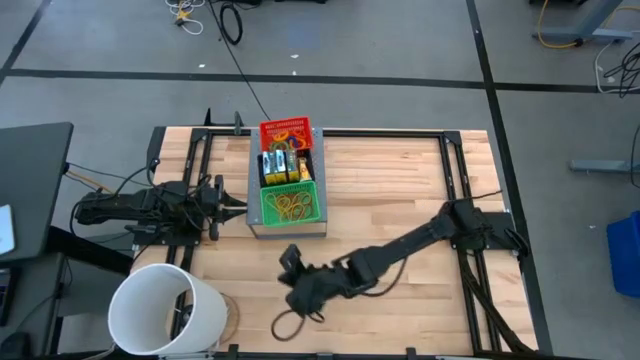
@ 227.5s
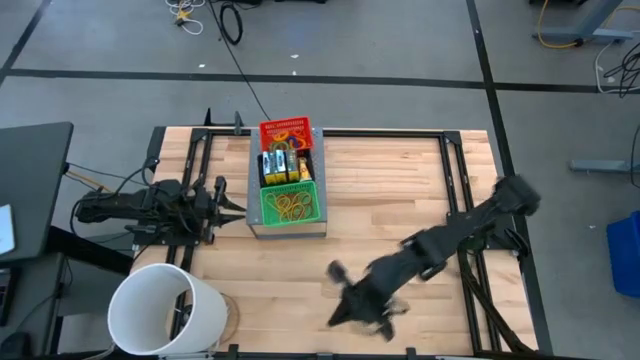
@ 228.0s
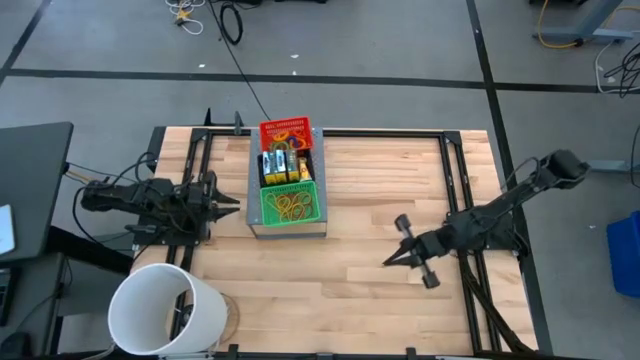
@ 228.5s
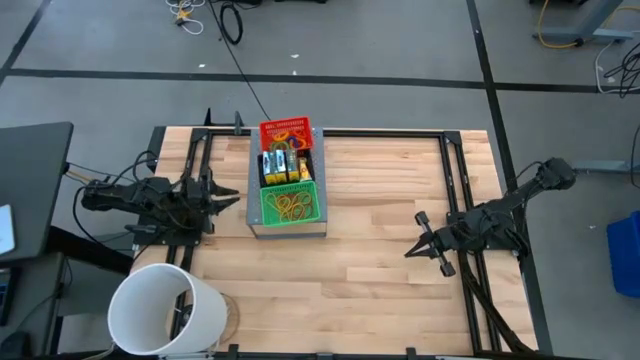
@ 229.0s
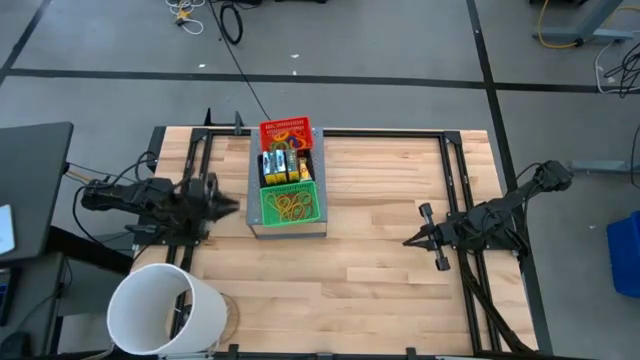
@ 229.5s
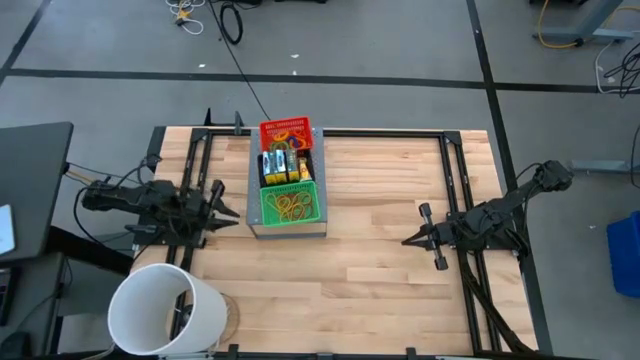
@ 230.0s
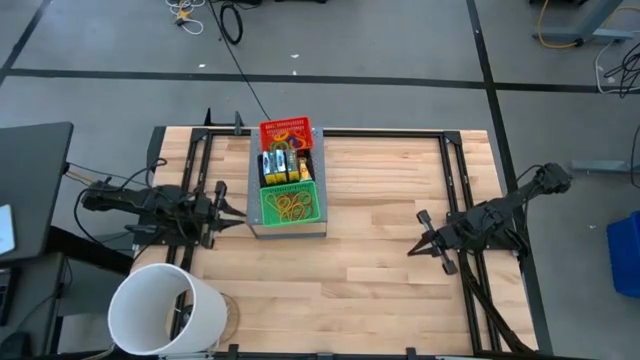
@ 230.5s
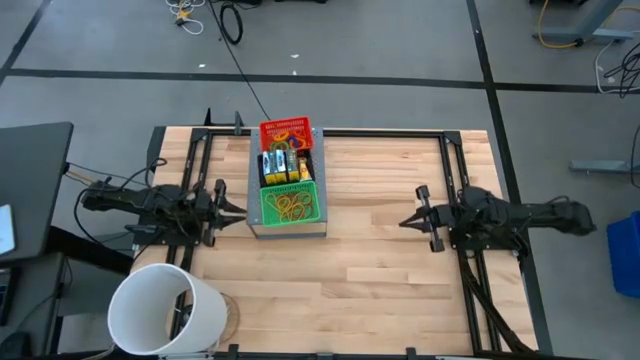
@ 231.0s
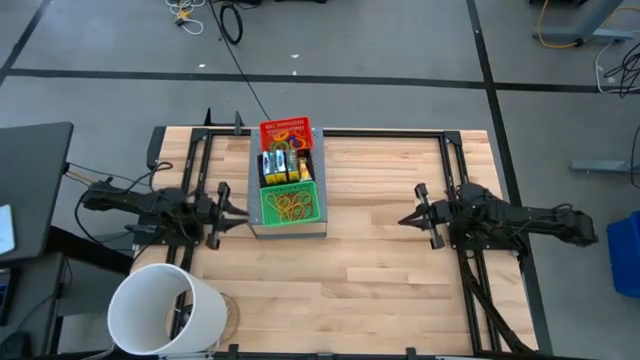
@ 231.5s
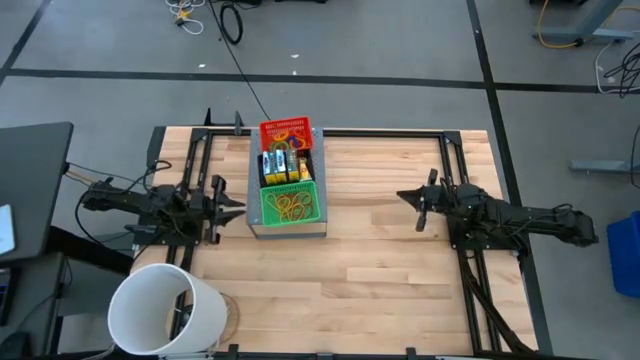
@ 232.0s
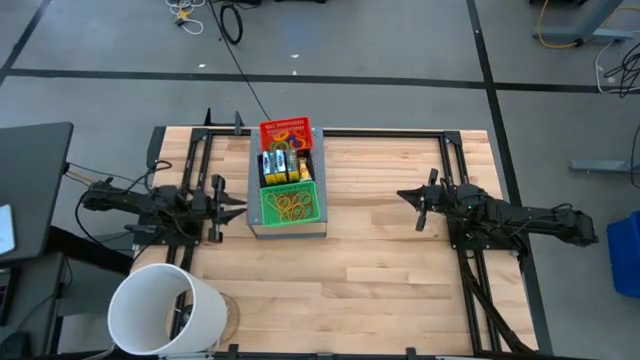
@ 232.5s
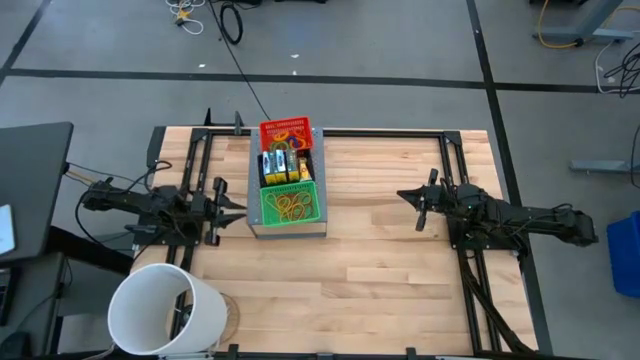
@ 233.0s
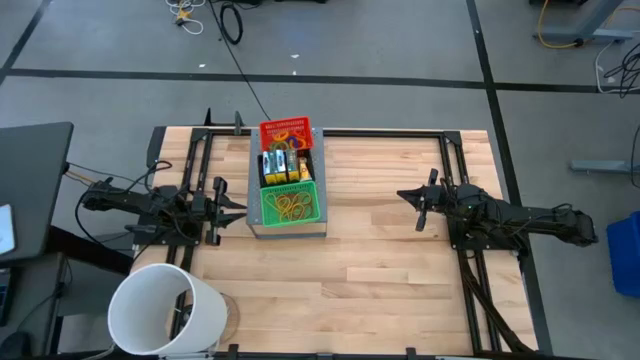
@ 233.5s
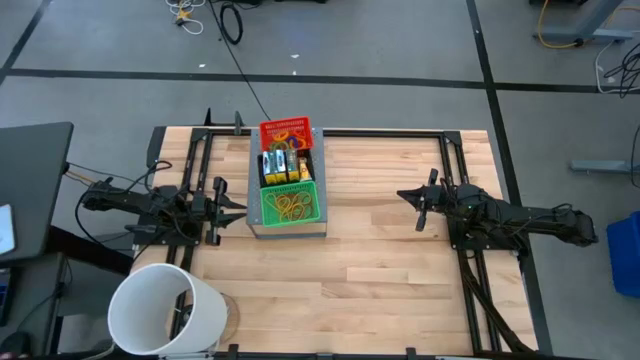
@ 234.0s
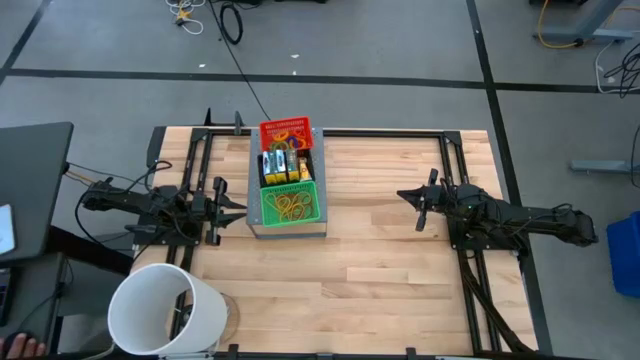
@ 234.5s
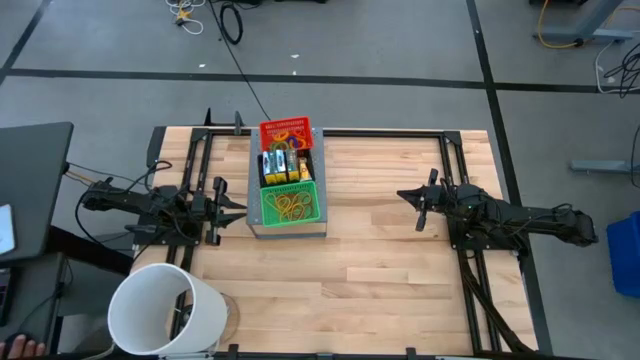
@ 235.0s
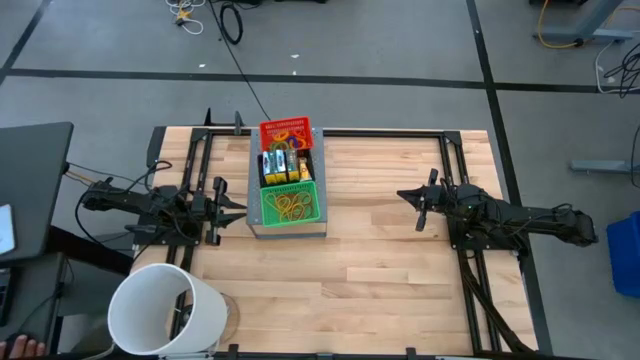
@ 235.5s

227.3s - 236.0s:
Task: Pick & Place Office Desk Supplies
Return to Home Position

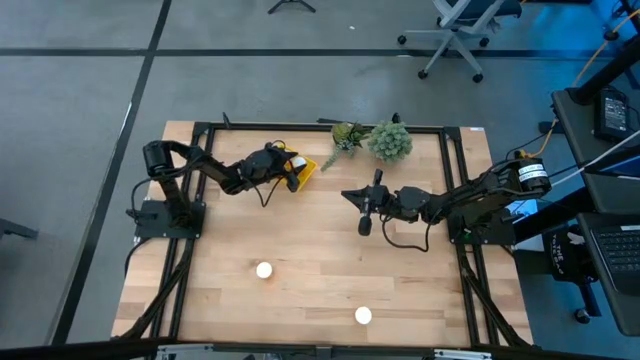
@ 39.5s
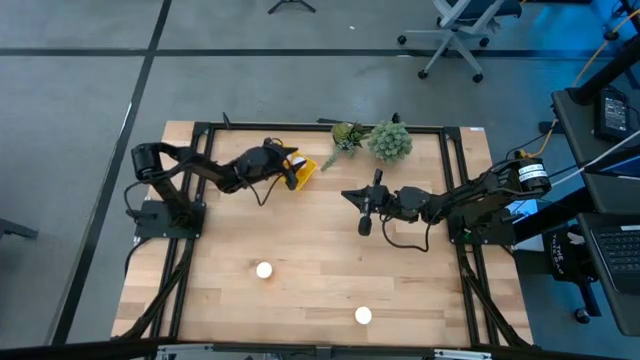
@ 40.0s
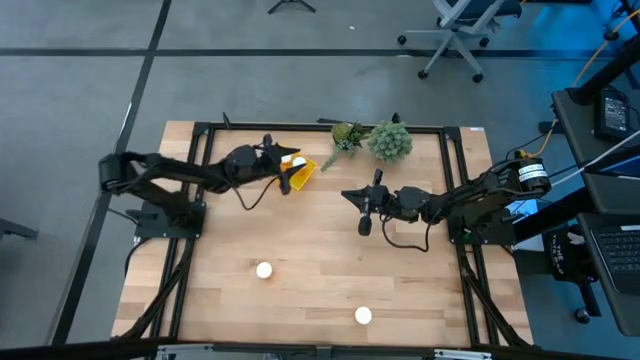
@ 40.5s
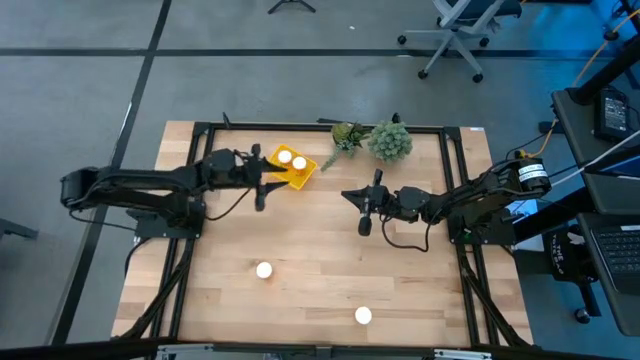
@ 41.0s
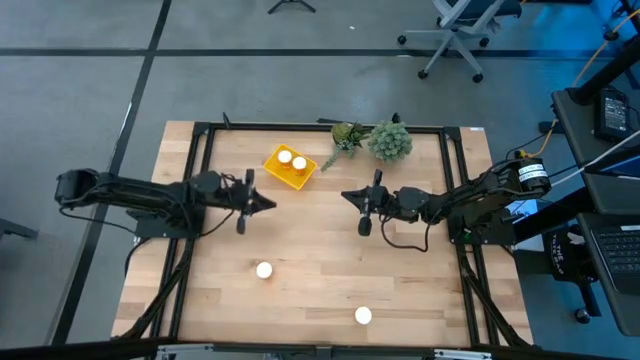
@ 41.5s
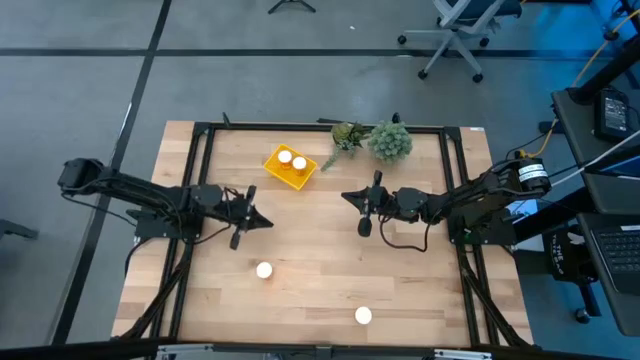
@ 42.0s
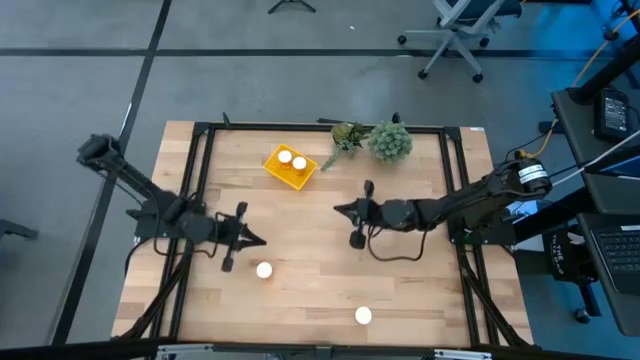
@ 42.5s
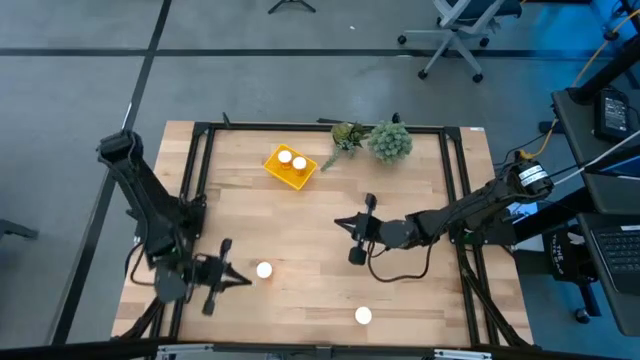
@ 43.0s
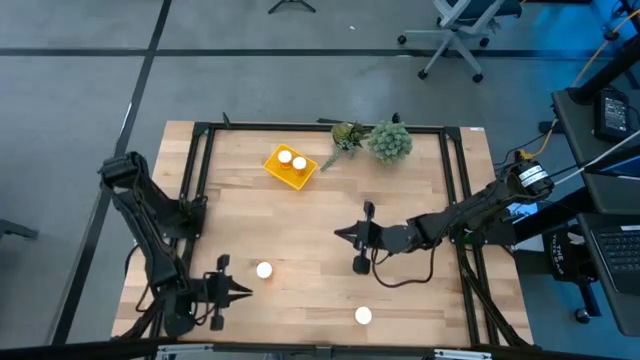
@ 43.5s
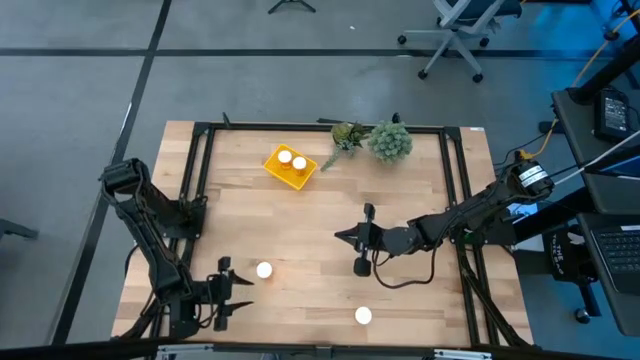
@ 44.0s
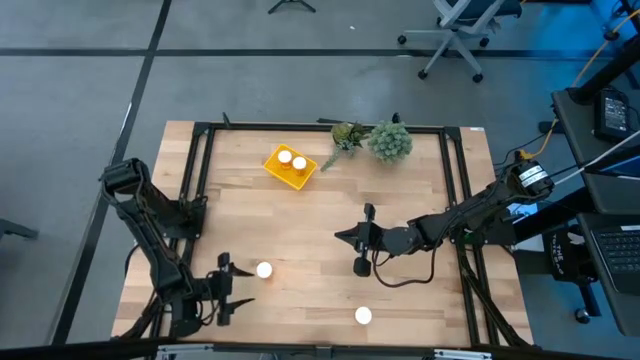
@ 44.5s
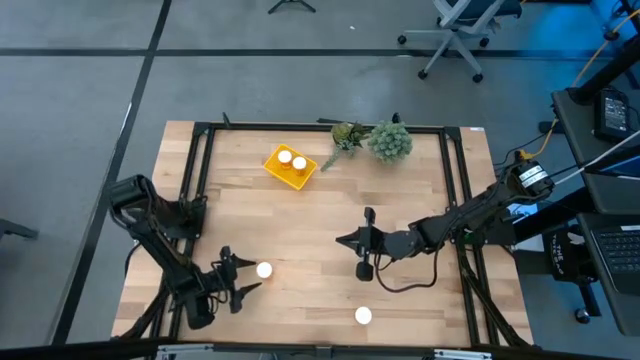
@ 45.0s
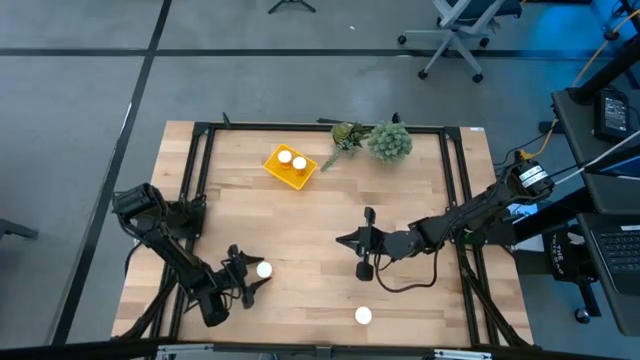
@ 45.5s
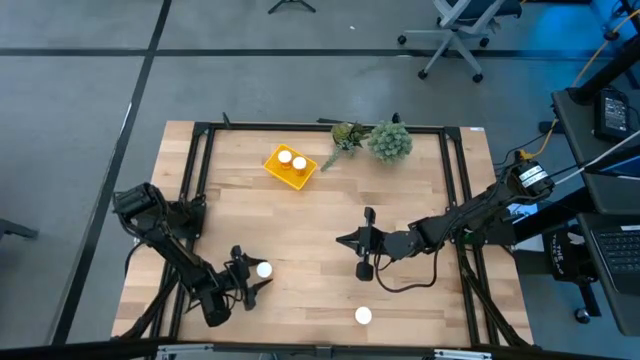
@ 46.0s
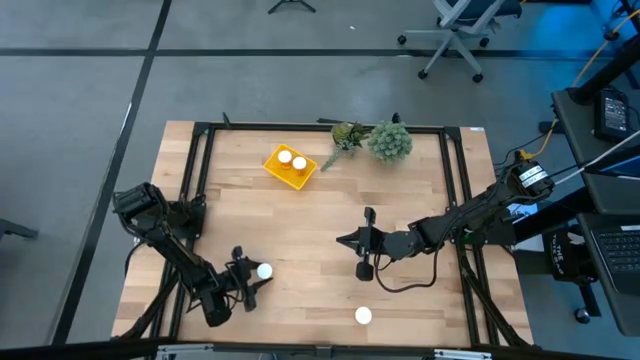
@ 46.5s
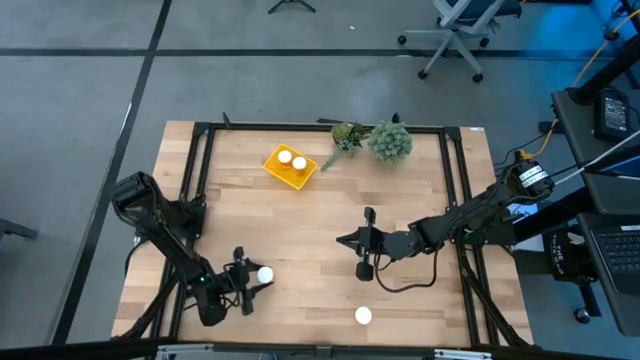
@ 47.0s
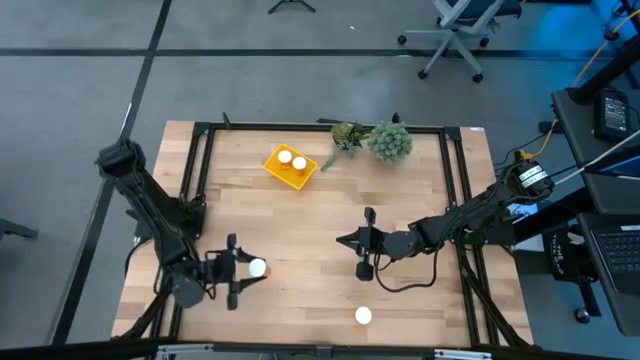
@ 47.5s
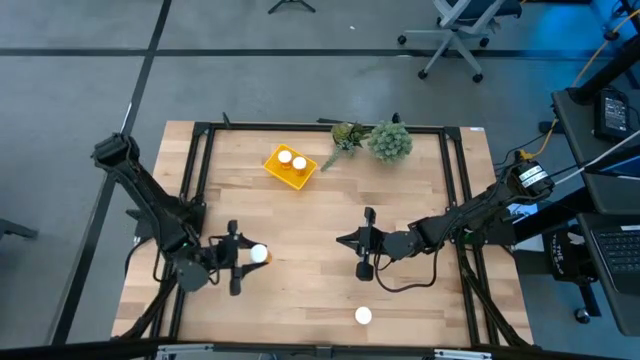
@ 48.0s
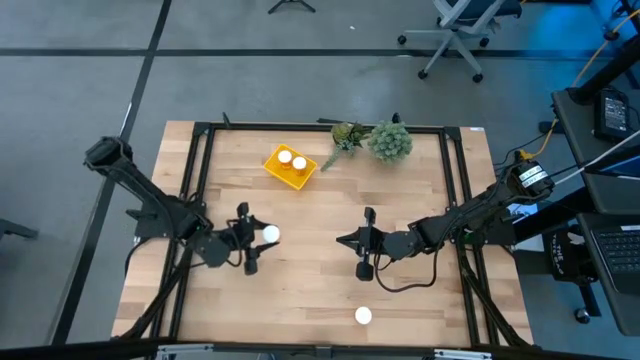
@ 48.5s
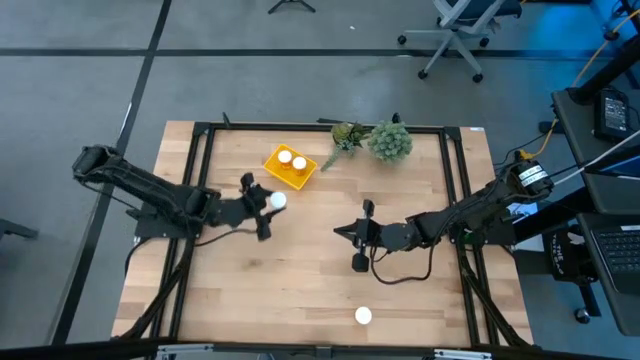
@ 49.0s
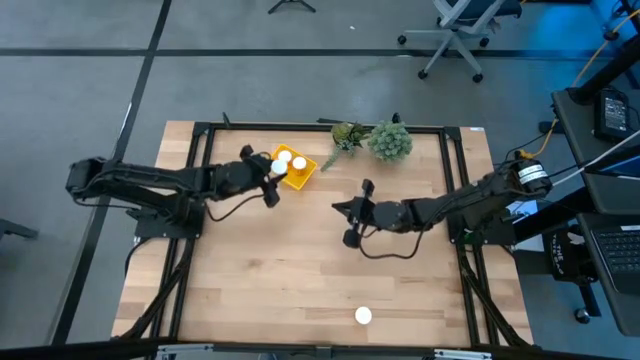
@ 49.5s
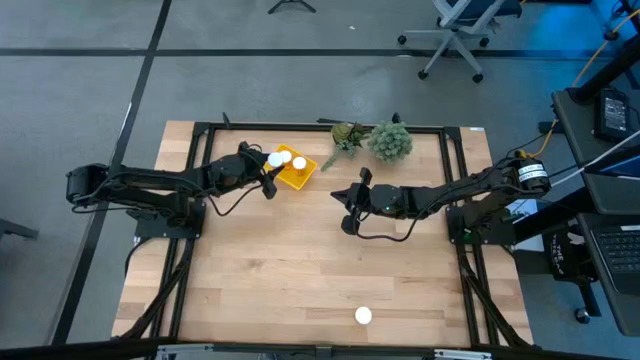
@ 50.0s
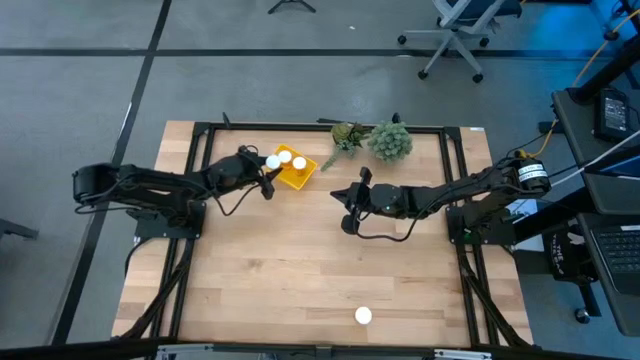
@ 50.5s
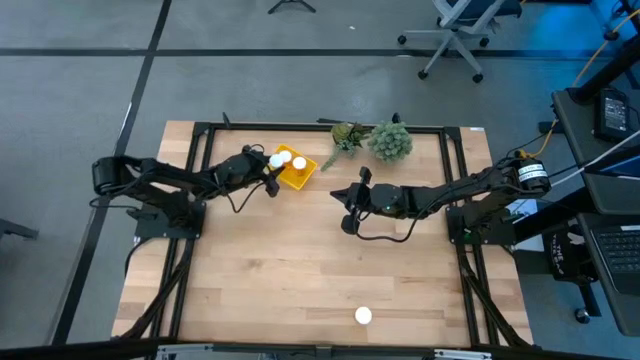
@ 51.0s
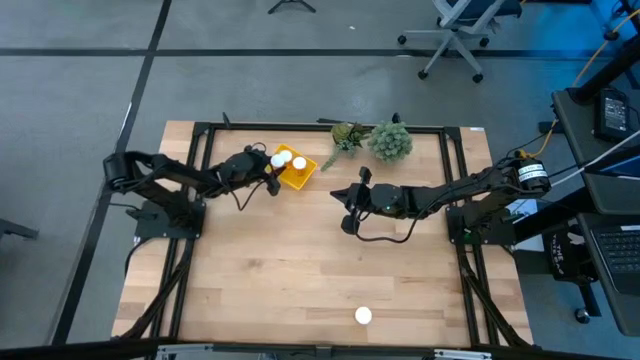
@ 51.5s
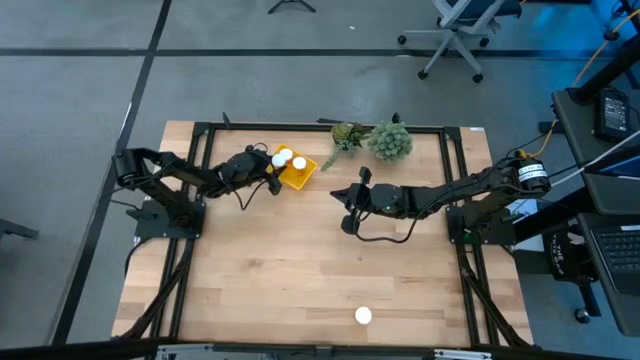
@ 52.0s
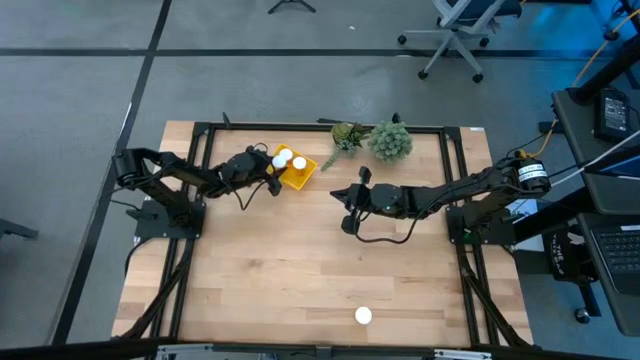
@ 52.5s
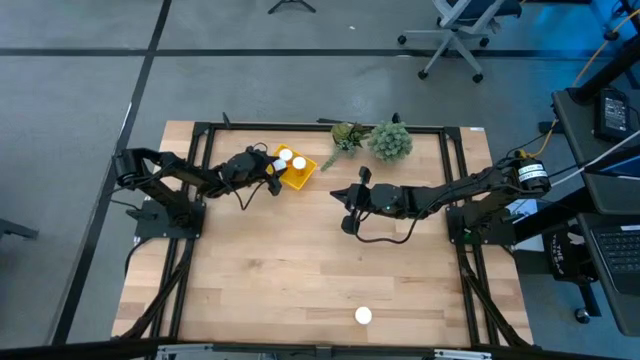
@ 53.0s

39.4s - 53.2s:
Task: Pick and place pill bottles into a basket
Put the left orange pill bottle into the yellow bin
